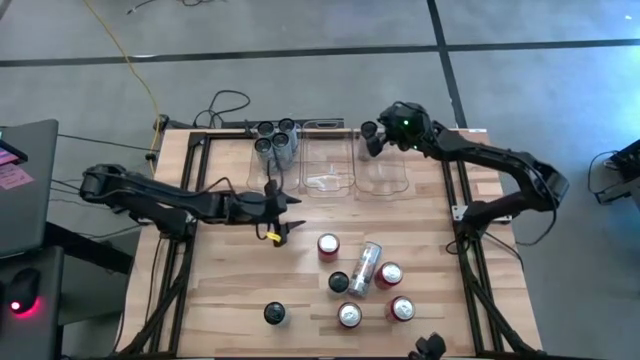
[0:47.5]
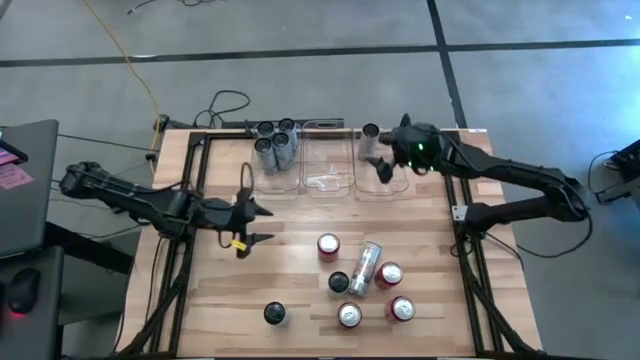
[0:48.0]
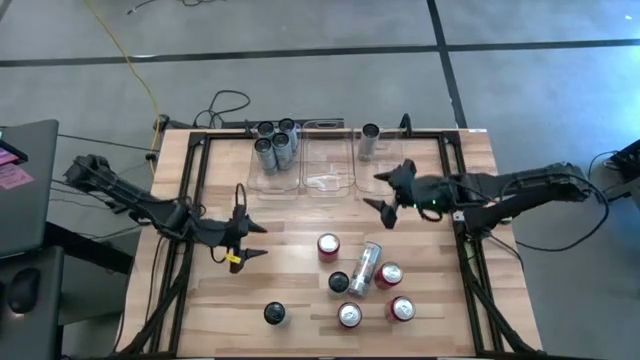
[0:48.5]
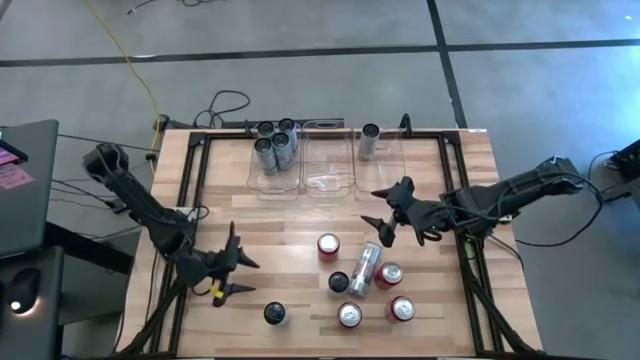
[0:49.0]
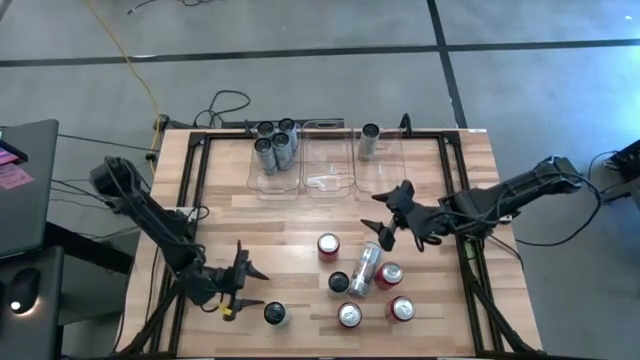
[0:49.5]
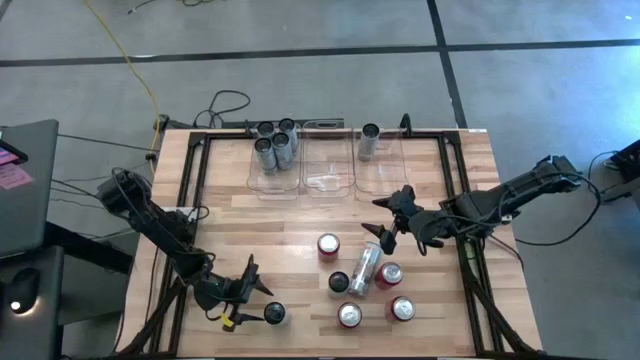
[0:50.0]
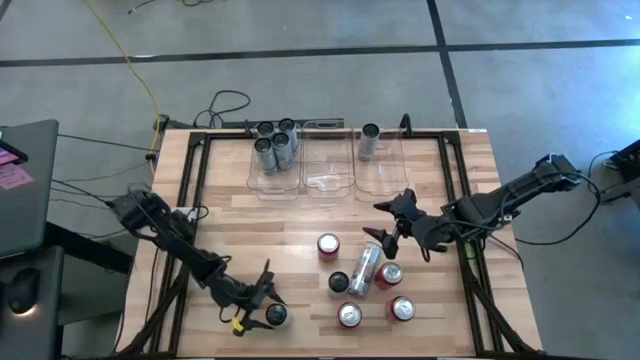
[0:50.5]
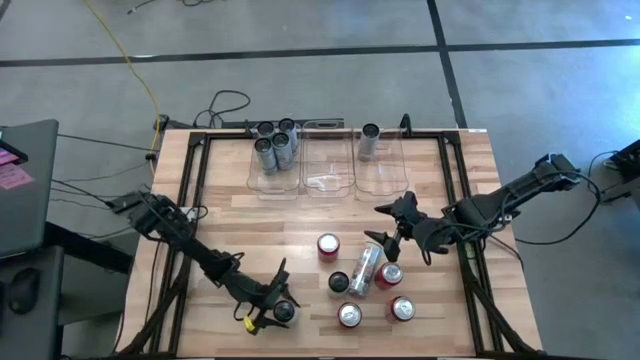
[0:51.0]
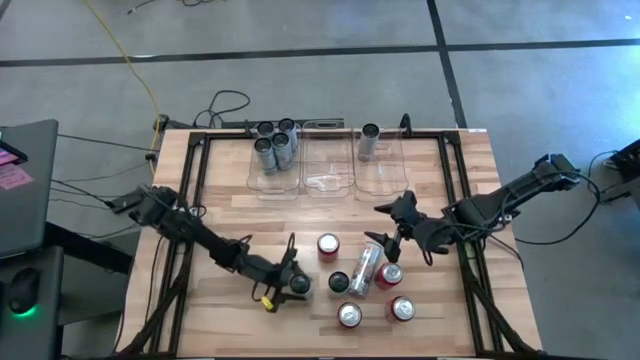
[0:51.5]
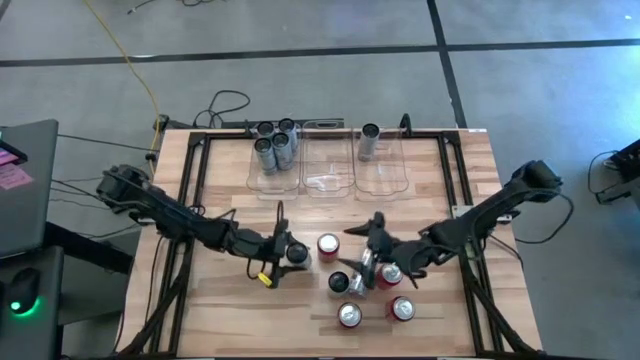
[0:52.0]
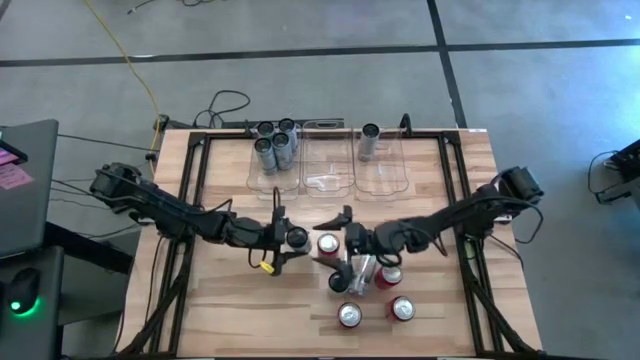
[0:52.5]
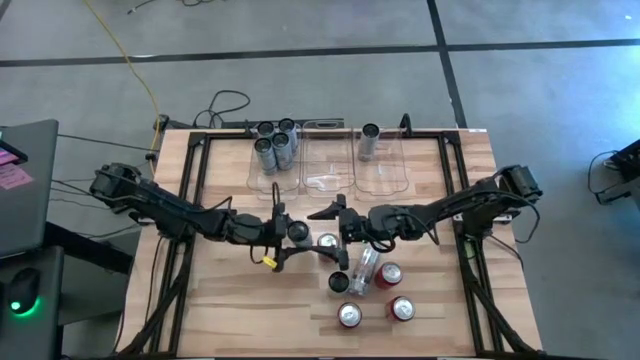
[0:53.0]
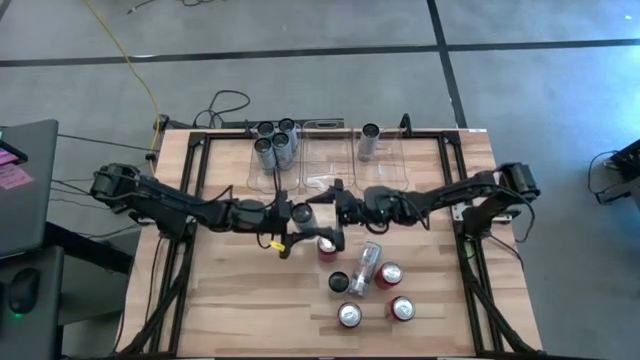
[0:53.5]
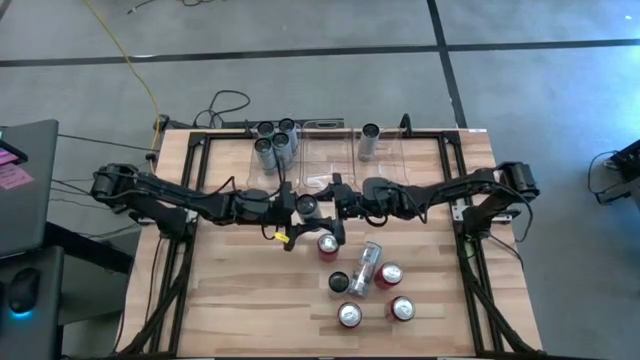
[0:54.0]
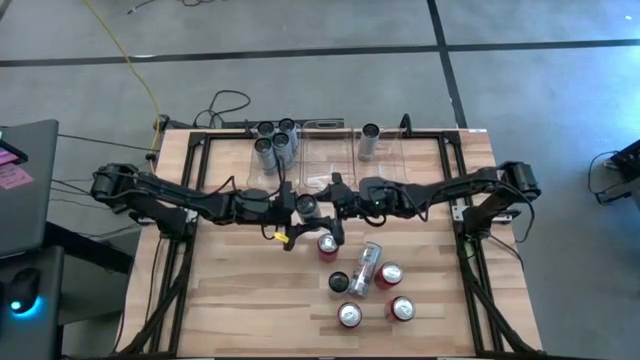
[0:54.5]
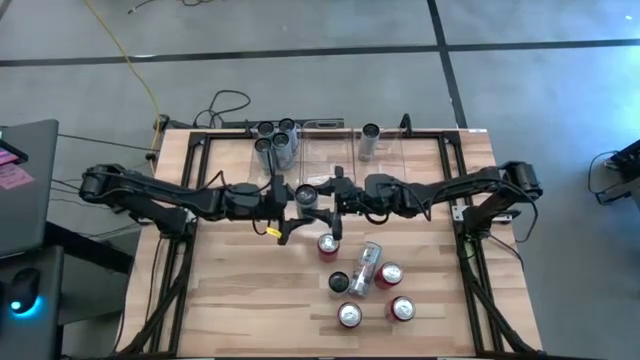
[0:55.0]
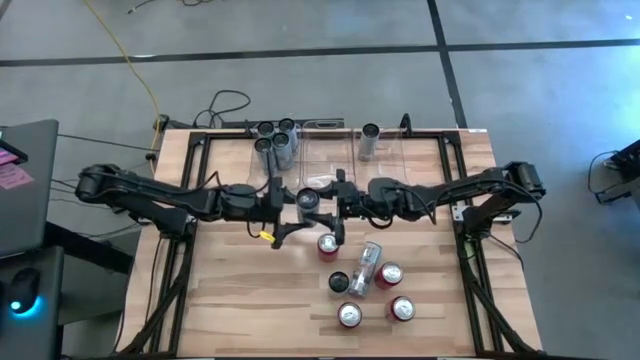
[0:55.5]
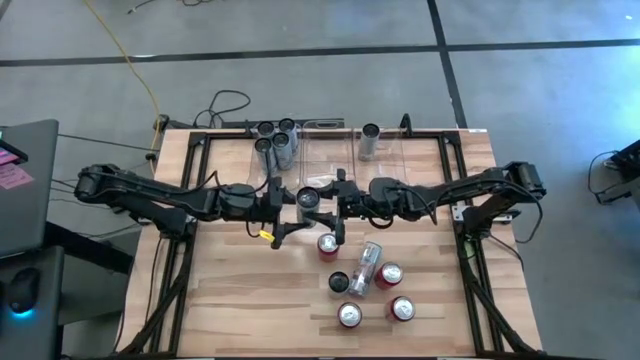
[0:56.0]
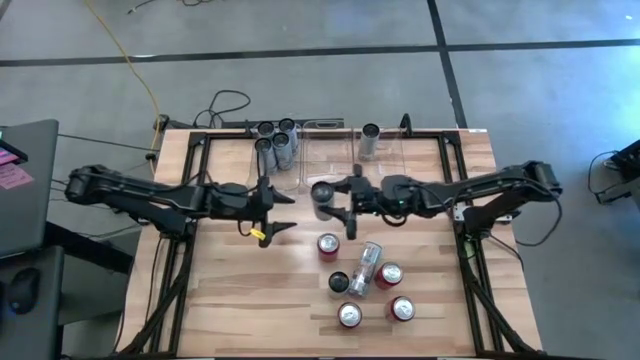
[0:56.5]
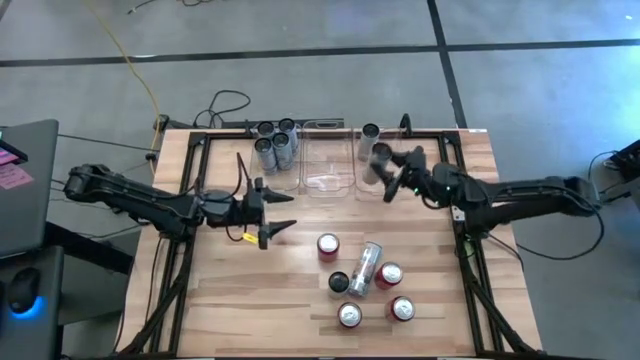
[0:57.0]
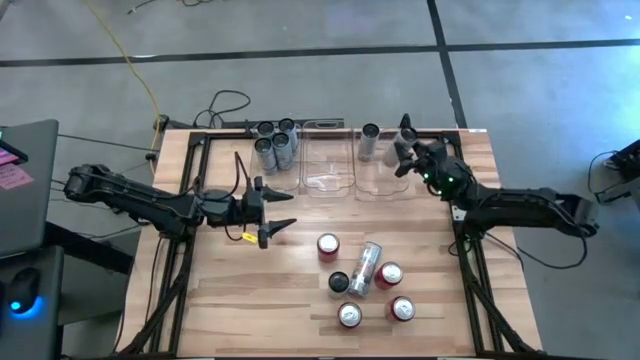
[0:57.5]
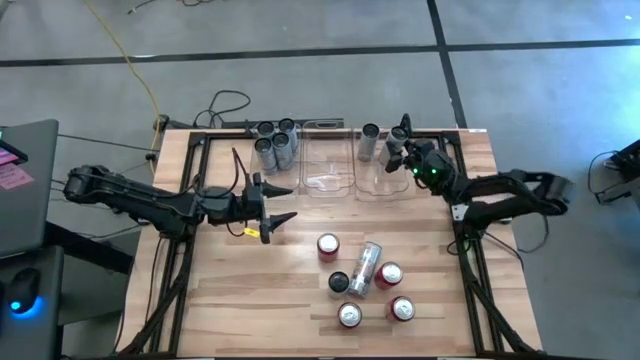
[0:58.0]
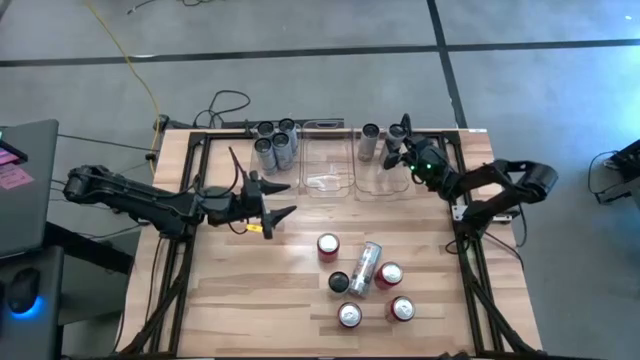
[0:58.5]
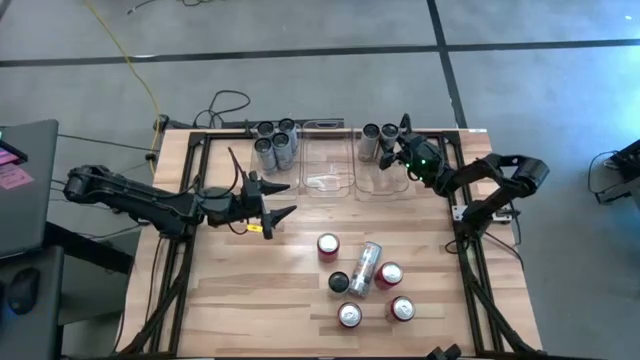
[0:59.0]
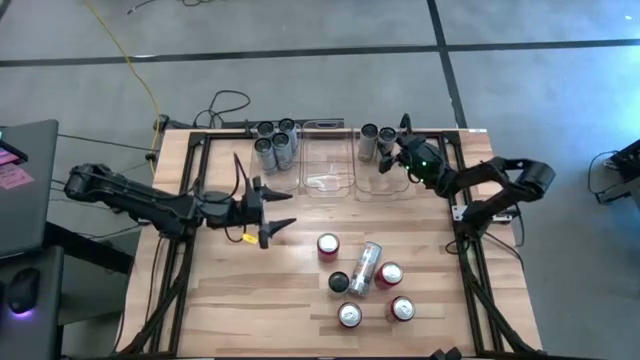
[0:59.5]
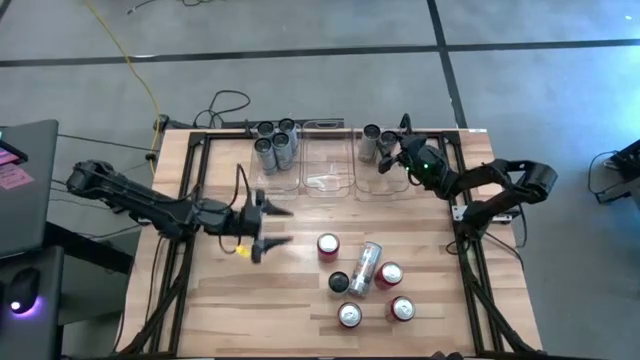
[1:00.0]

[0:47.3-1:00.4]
Task: Sort soda cans
Put the white-yellow soda can into the right transparent bin

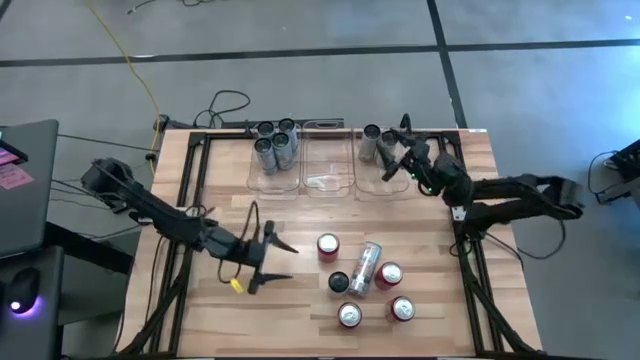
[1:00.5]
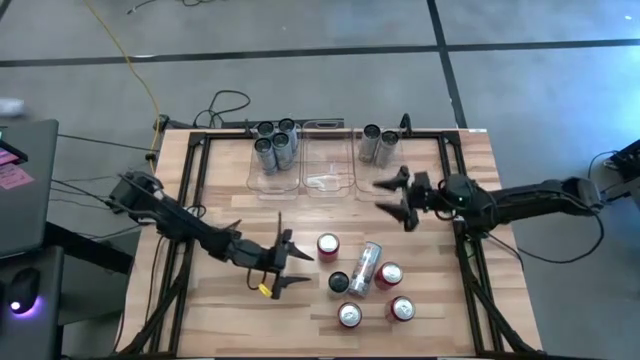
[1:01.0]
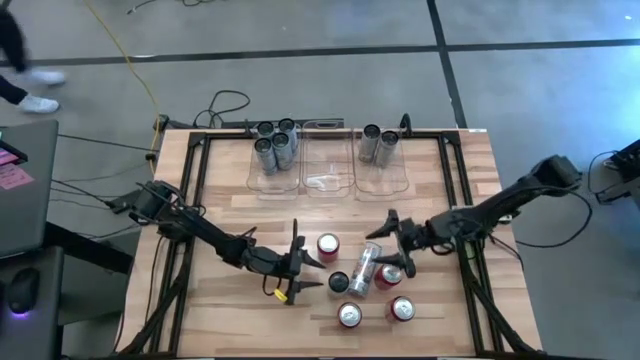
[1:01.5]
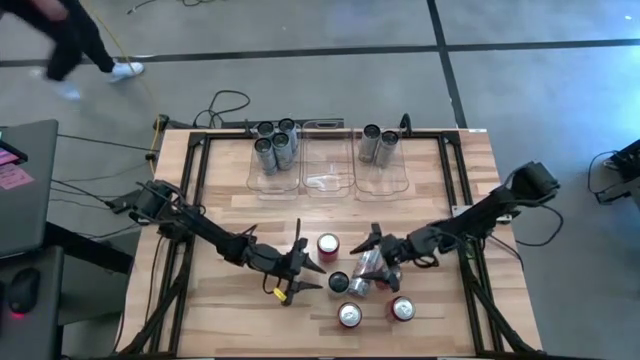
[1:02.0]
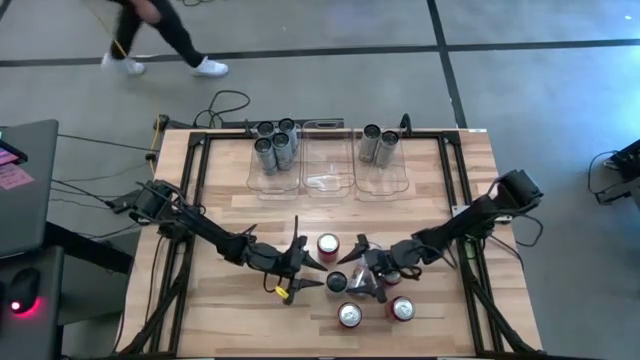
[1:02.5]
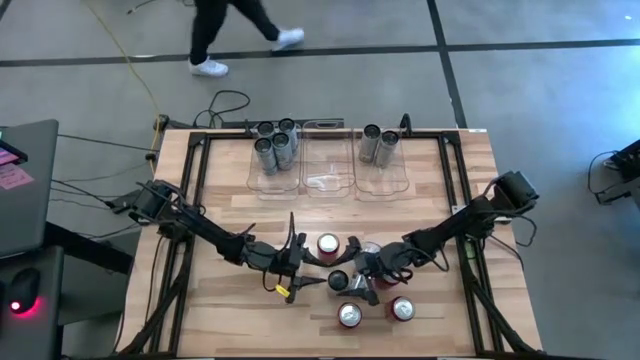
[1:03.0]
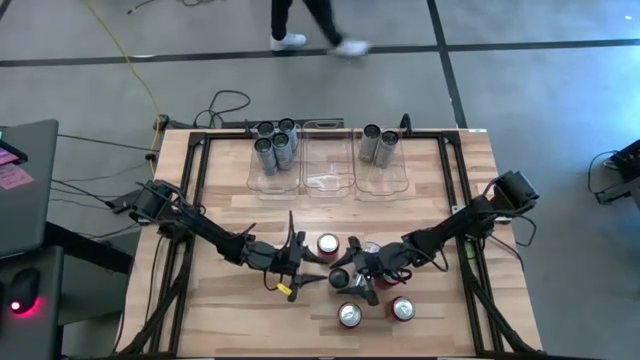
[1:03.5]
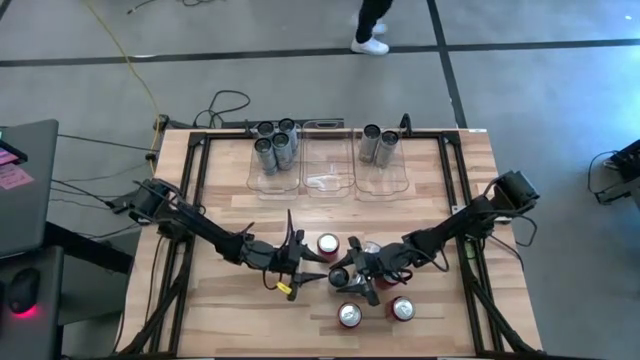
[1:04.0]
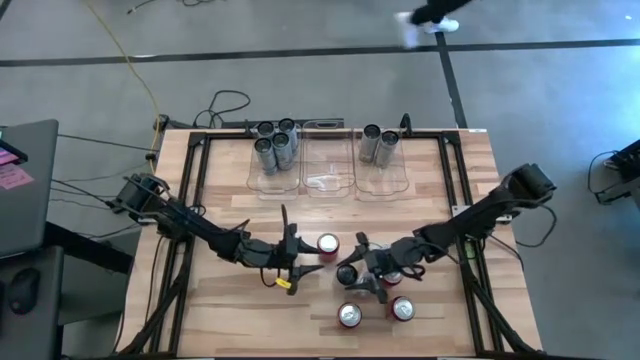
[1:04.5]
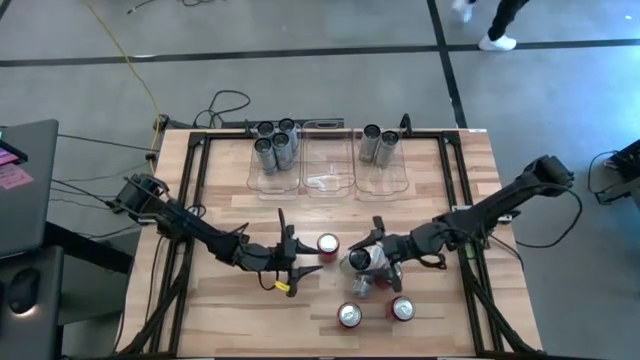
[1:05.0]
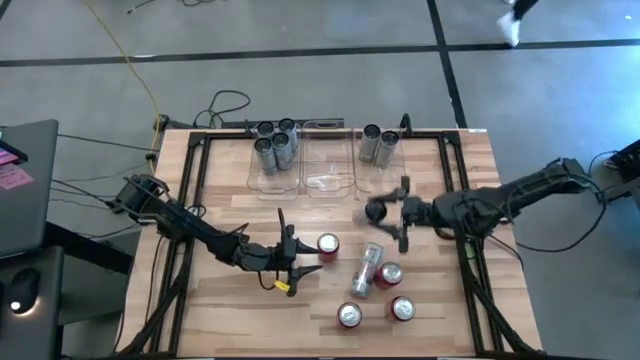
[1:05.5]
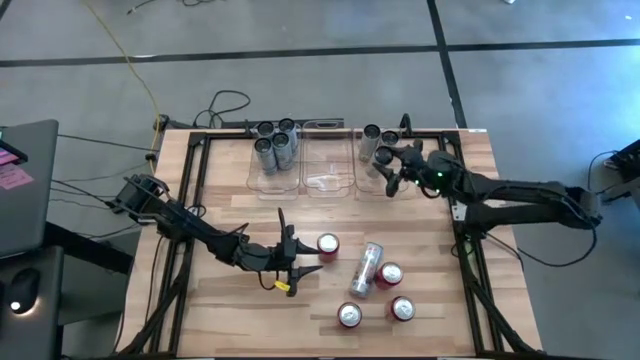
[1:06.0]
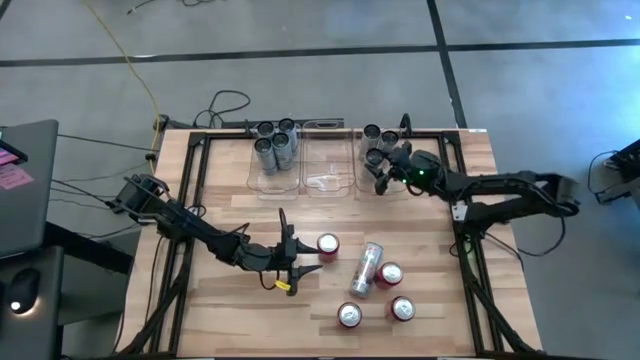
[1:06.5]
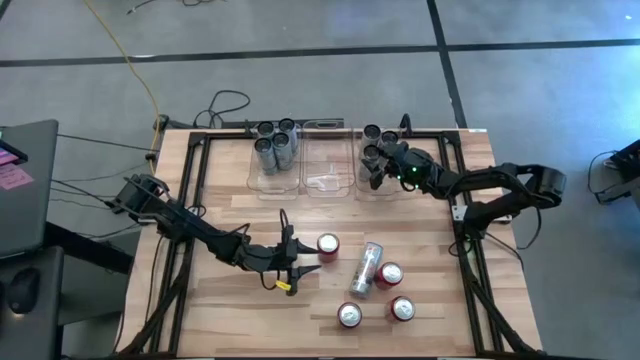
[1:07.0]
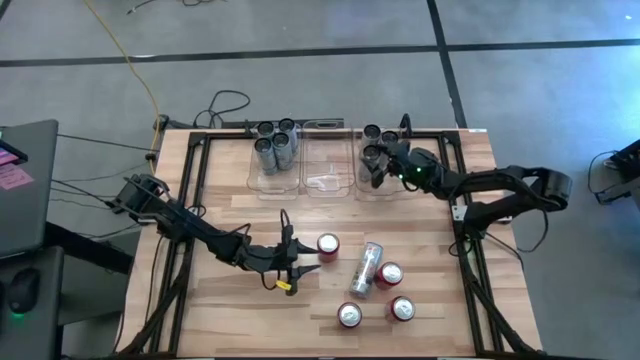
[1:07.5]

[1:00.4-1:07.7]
Put the white-yellow soda can into the right transparent bin
